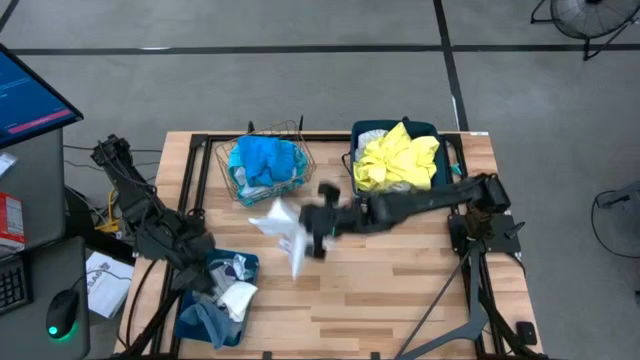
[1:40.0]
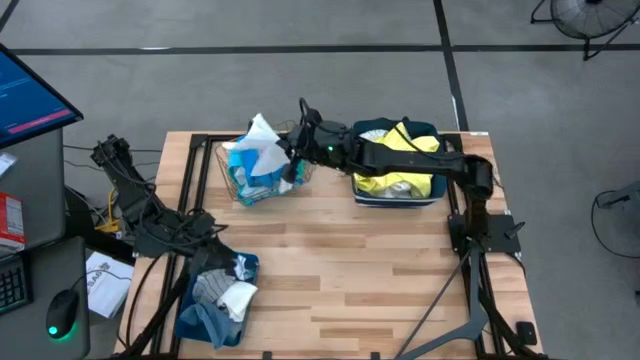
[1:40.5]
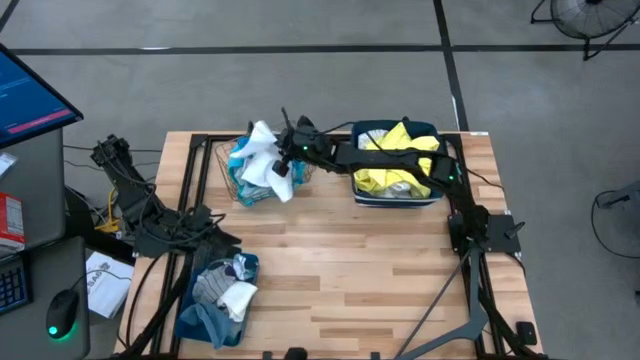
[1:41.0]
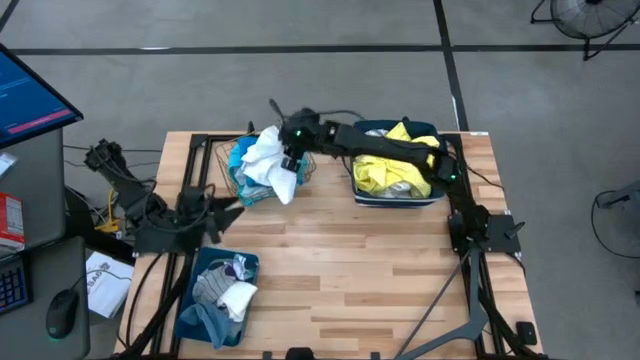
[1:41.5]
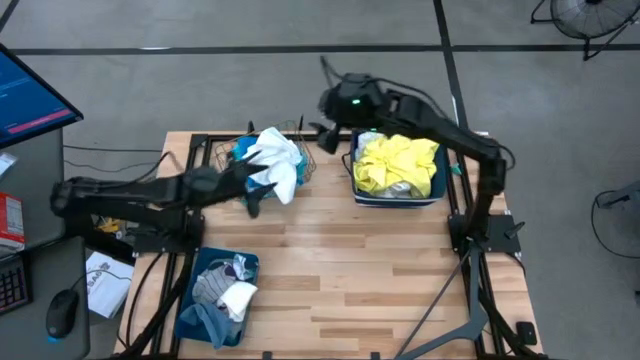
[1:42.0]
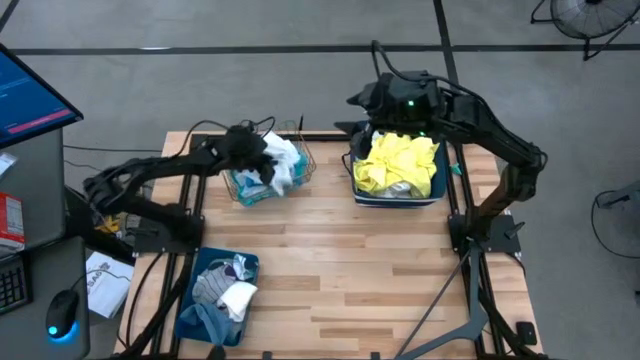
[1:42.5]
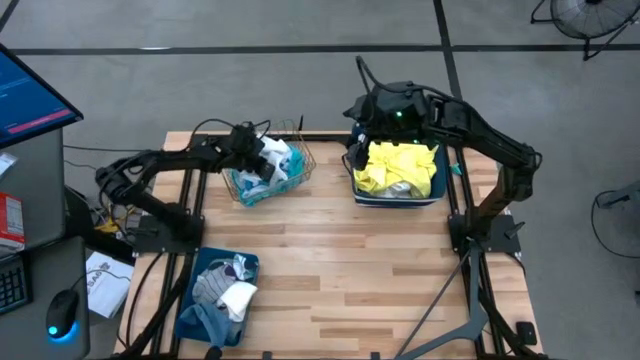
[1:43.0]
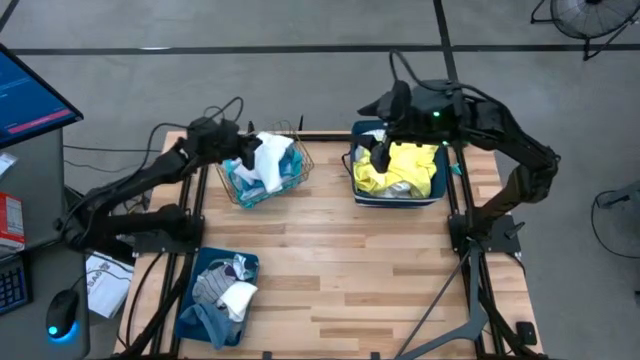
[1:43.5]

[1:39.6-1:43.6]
Task: Pick & Place Cloths
Put the white hand towel into the gold wire basket

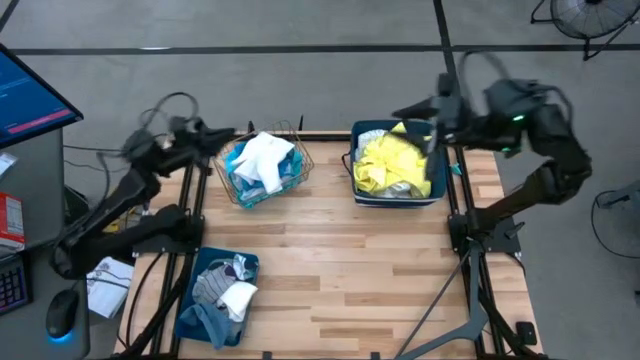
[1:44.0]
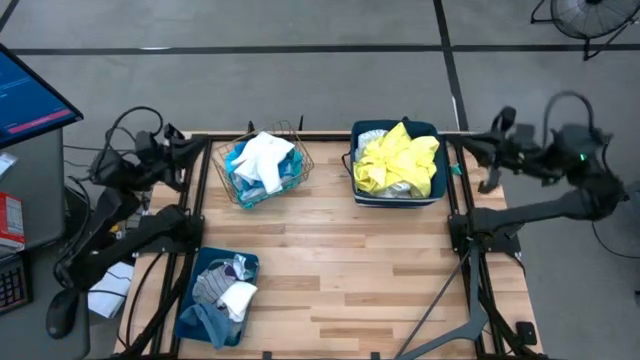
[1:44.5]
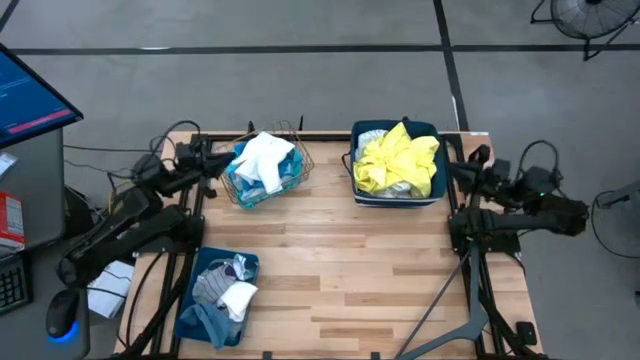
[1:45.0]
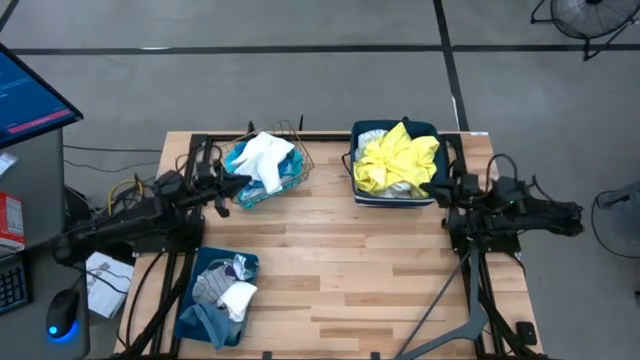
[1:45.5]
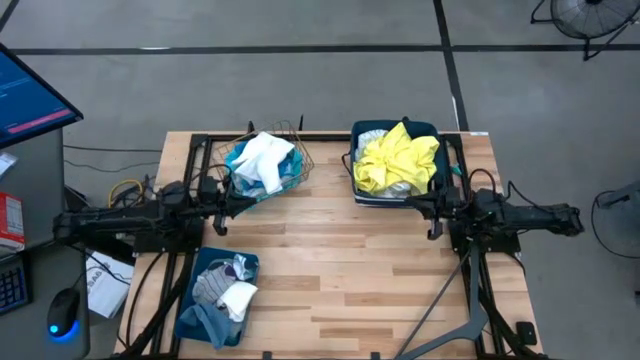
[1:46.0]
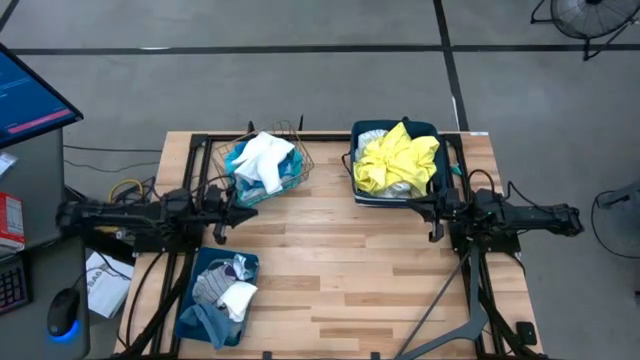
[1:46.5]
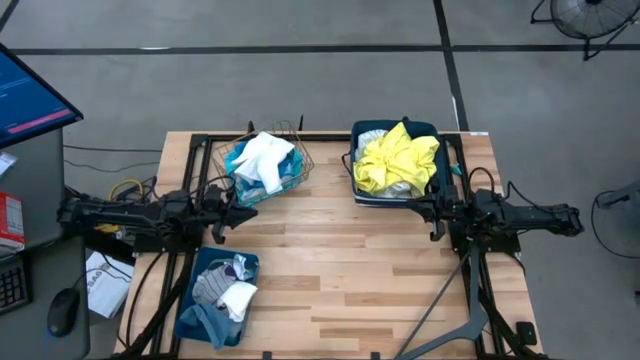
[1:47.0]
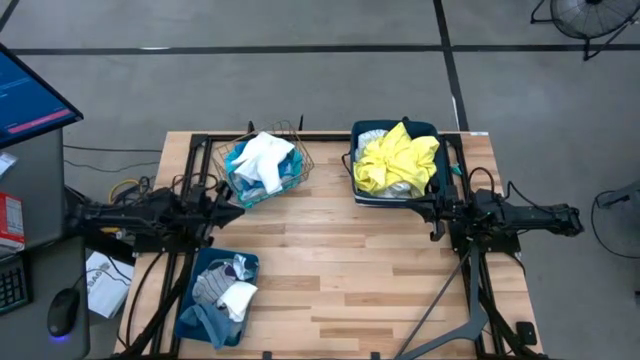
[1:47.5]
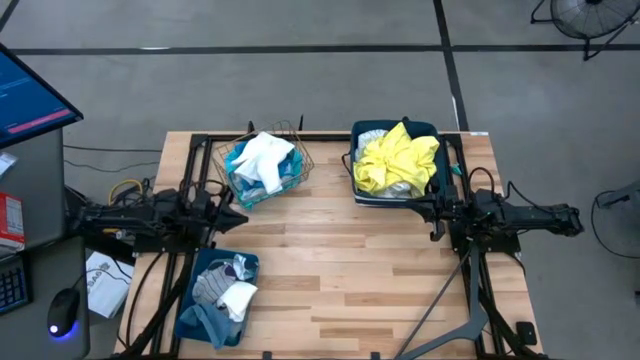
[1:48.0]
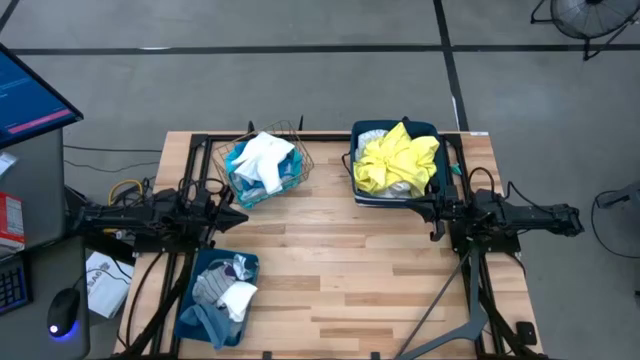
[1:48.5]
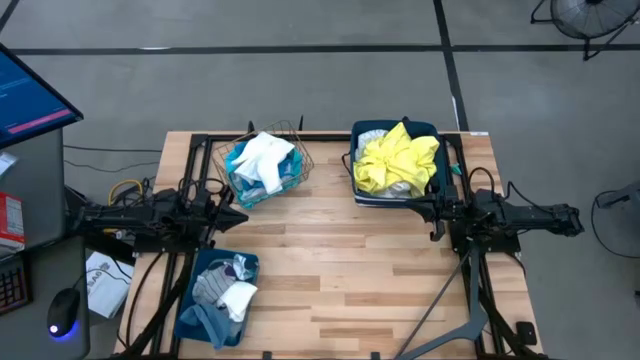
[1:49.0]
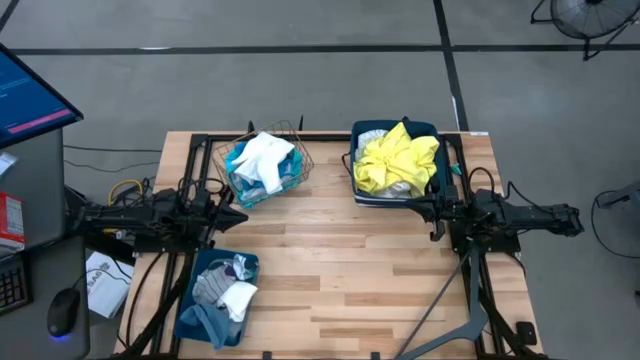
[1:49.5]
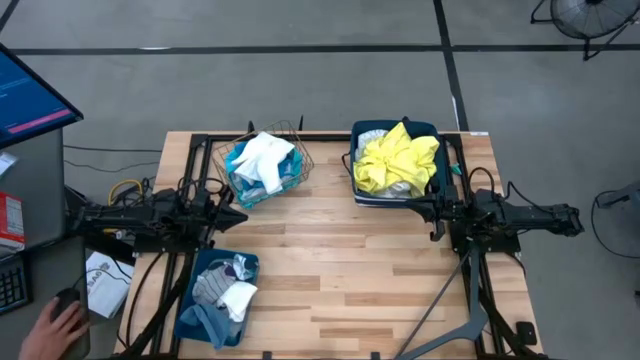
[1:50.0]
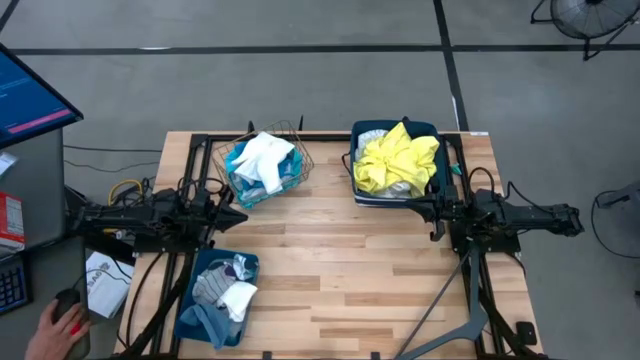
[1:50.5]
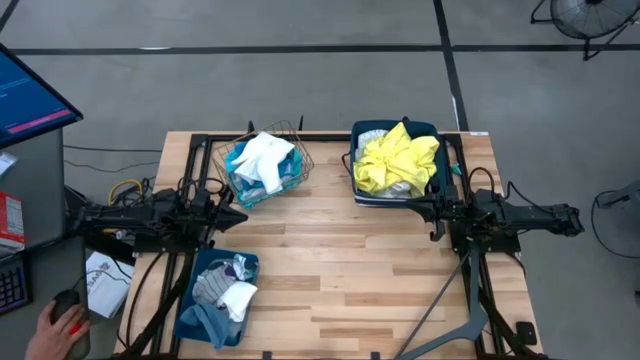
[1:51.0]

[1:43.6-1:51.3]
Return to Home Position

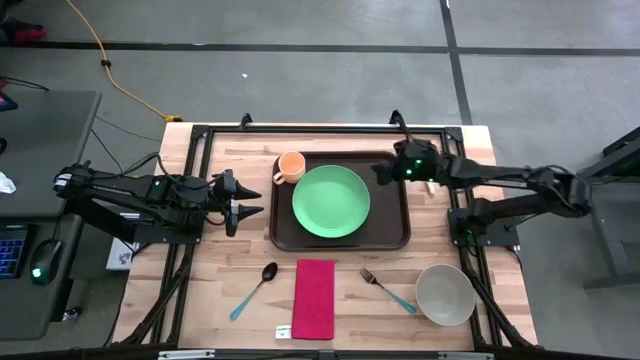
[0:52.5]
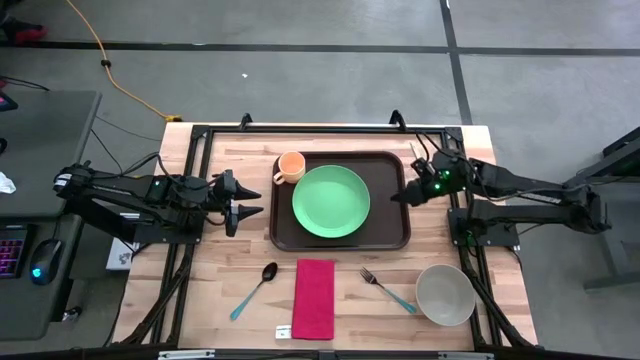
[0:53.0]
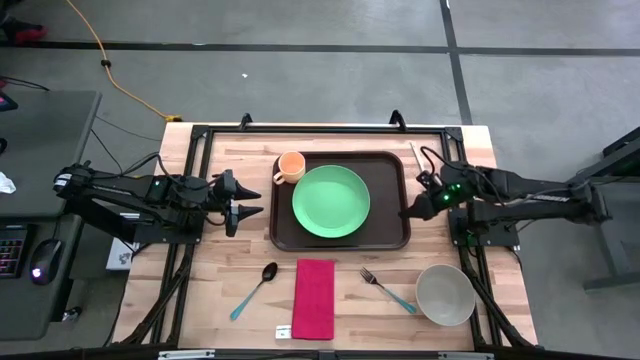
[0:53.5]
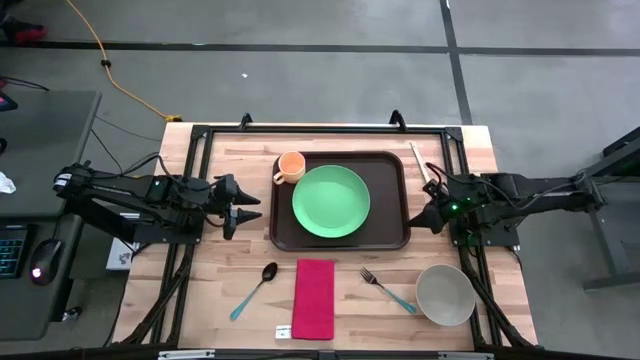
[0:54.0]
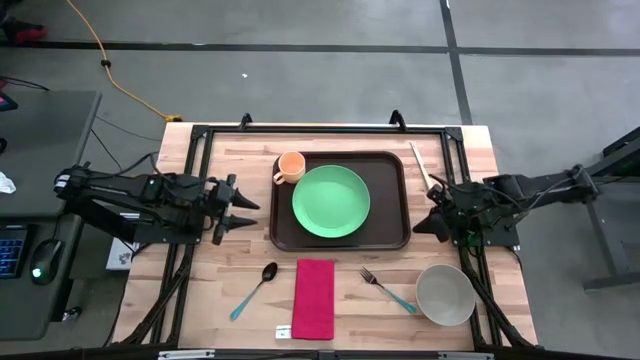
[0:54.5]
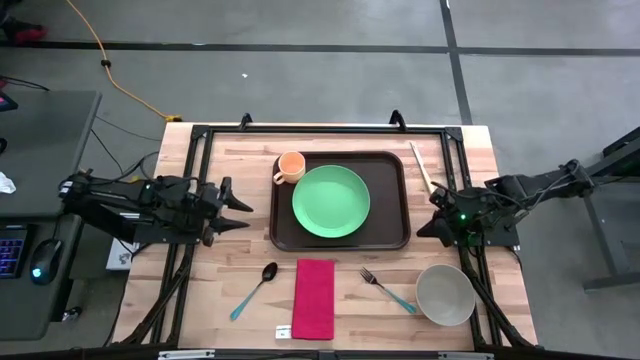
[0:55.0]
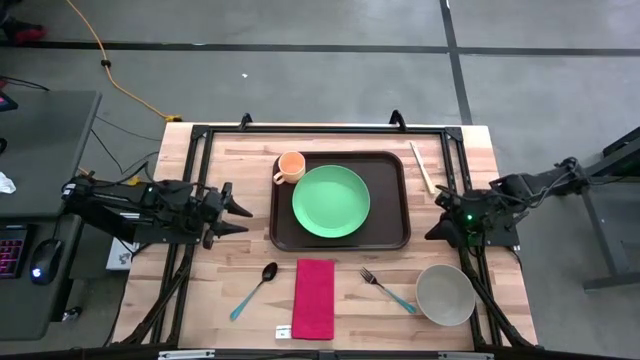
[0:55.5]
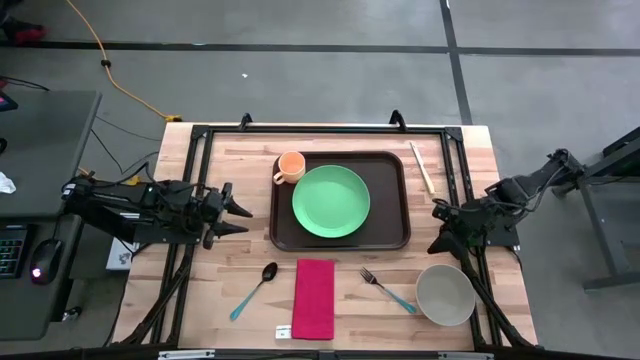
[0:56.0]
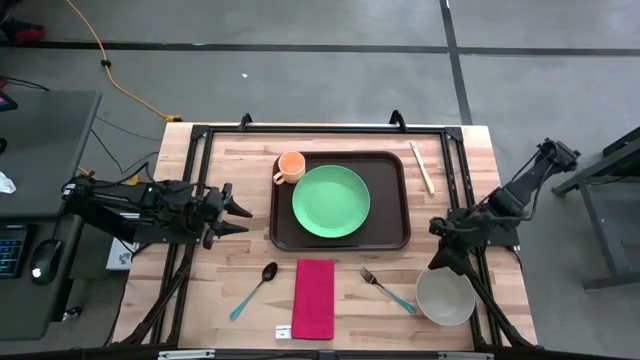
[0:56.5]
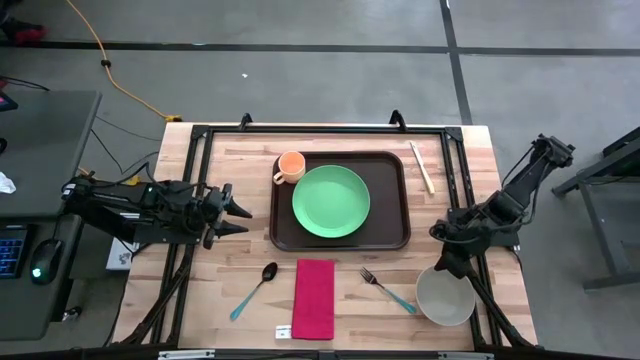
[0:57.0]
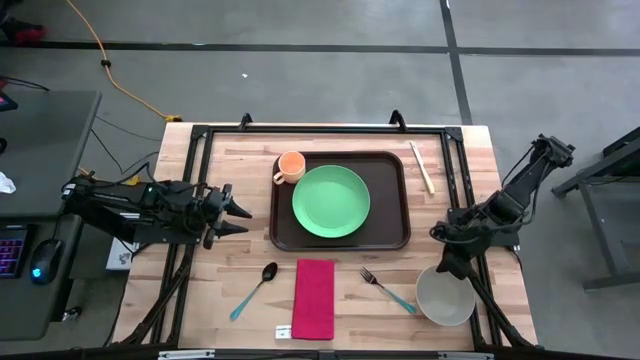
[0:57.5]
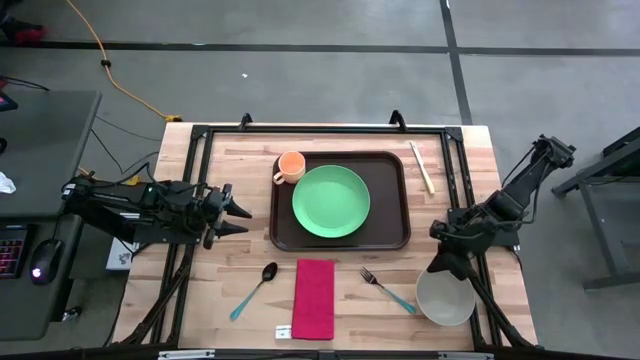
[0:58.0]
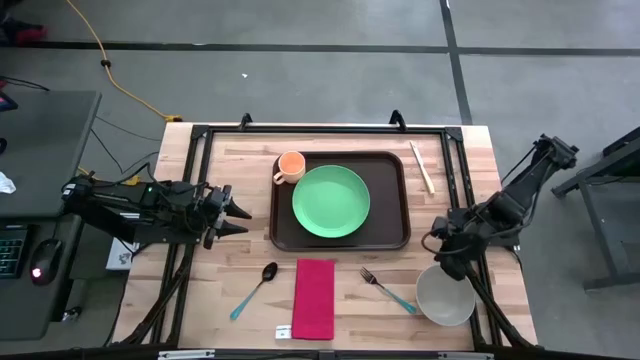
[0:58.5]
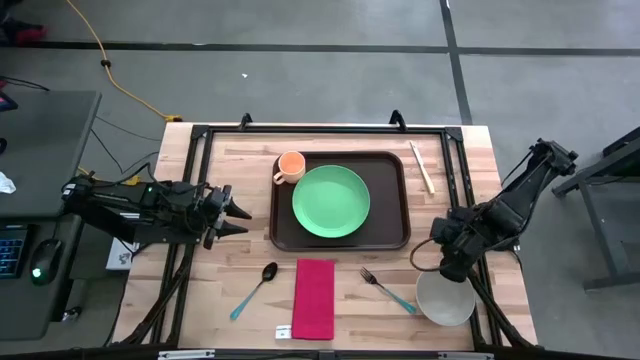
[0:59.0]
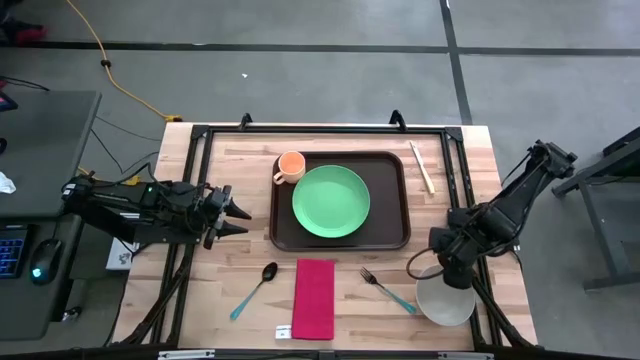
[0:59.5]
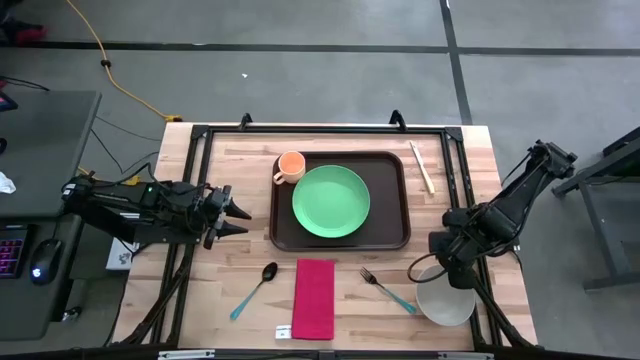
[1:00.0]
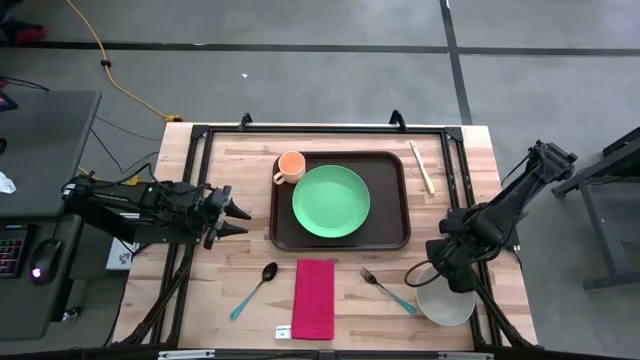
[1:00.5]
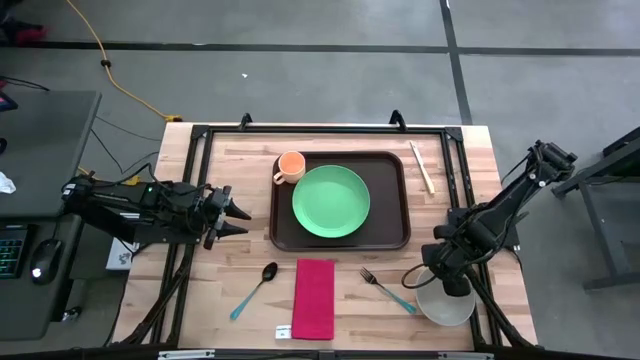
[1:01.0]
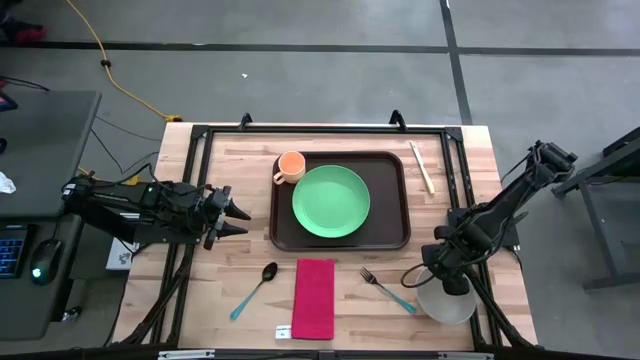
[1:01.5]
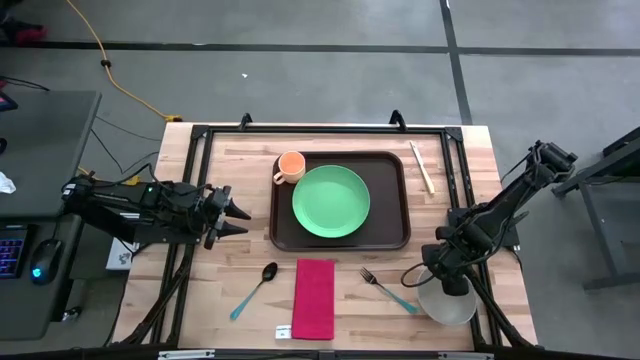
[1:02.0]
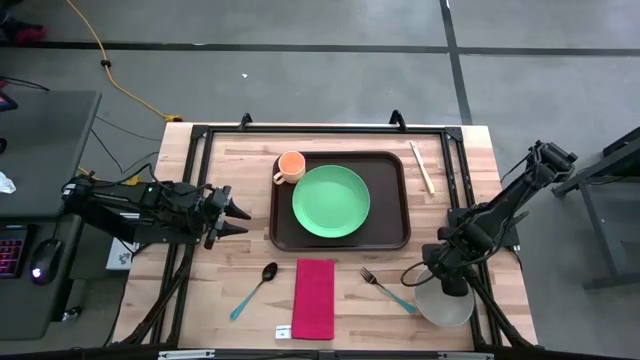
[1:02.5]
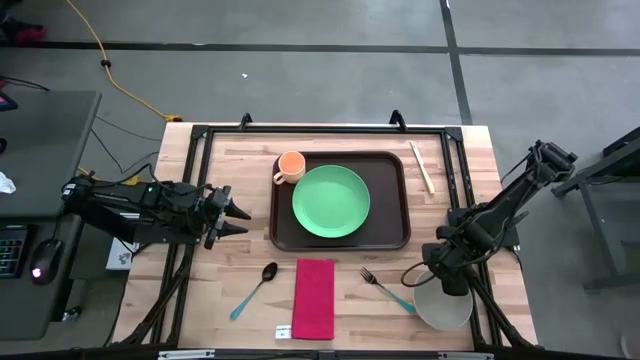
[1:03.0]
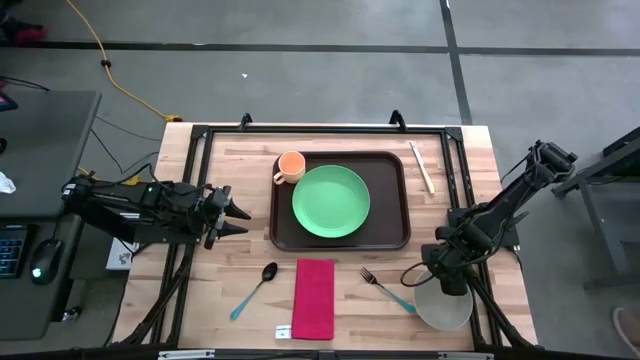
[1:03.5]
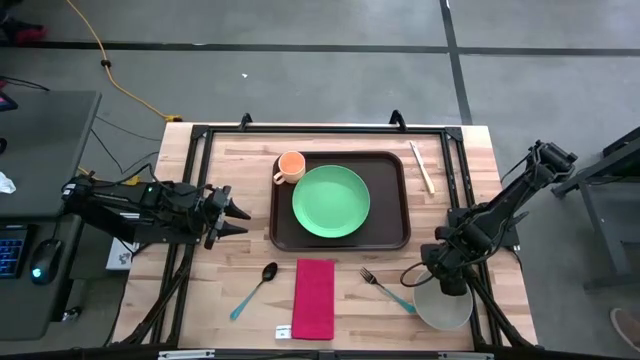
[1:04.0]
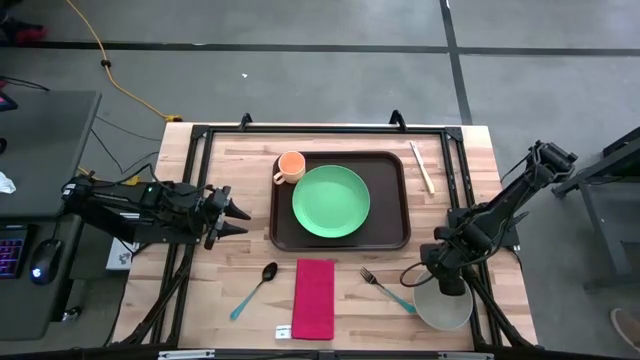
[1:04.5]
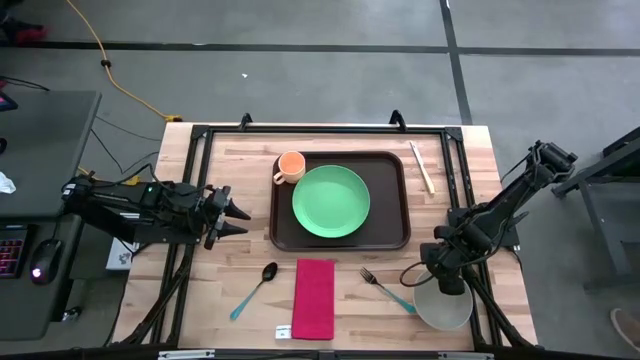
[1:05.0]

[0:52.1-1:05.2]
Task: Set up tray
Put the gray bowl on the green plate
